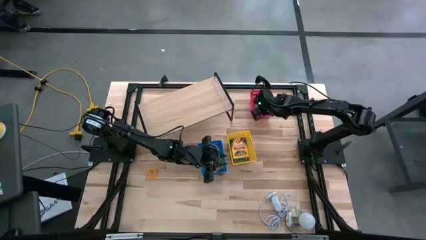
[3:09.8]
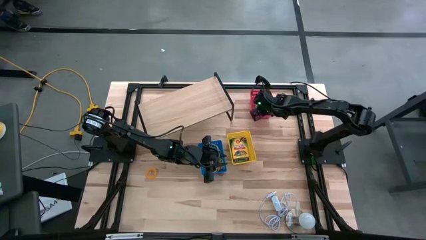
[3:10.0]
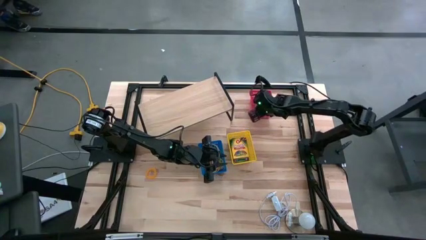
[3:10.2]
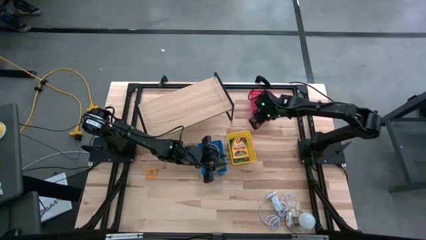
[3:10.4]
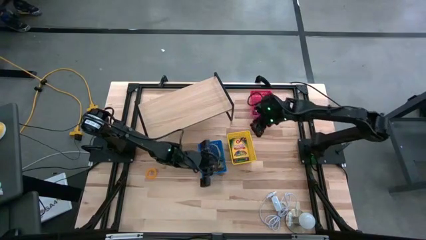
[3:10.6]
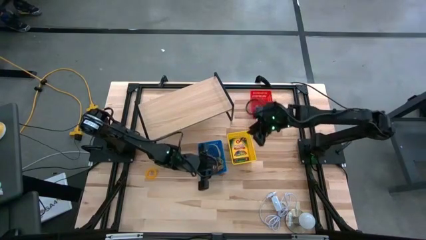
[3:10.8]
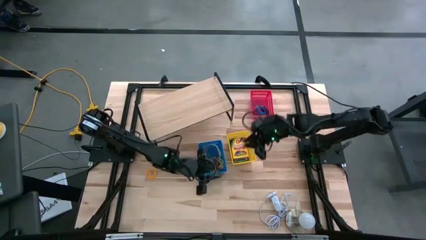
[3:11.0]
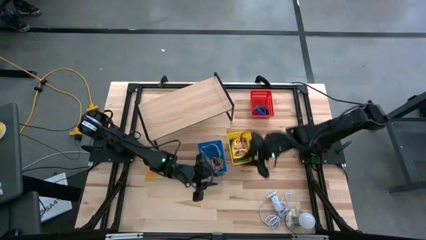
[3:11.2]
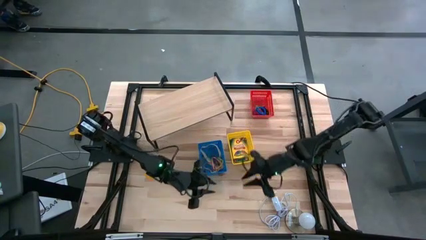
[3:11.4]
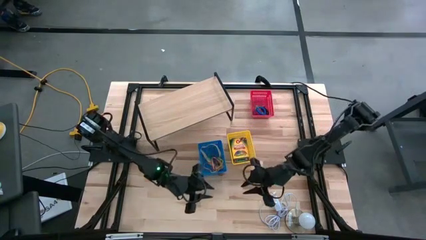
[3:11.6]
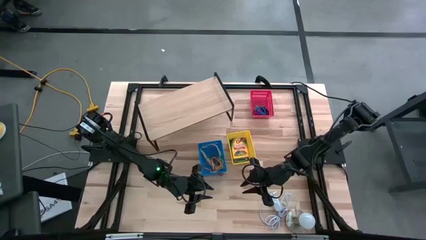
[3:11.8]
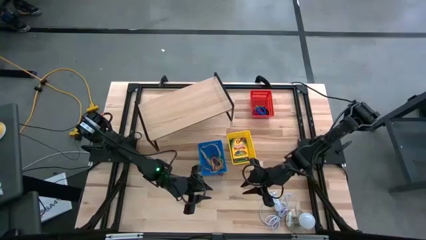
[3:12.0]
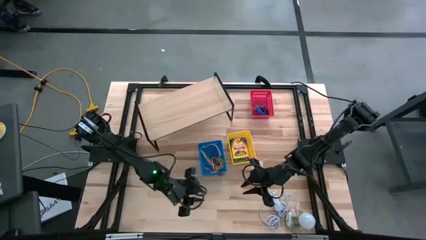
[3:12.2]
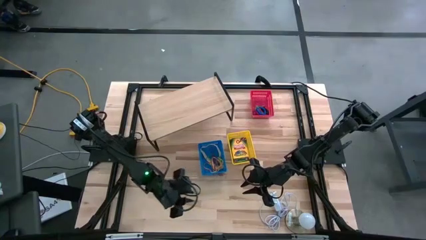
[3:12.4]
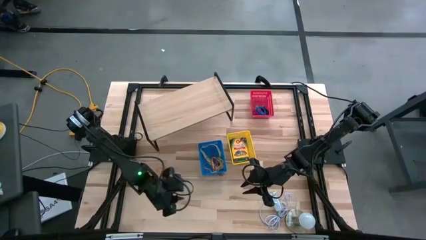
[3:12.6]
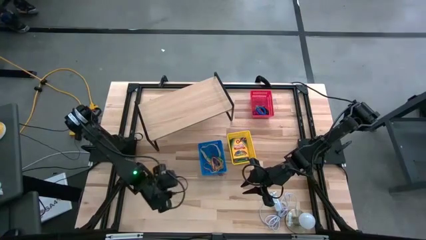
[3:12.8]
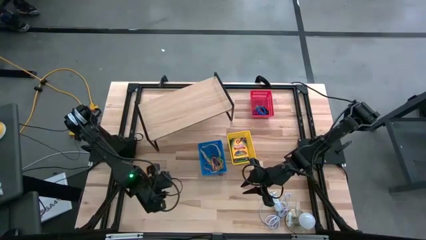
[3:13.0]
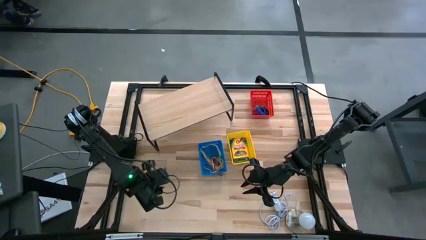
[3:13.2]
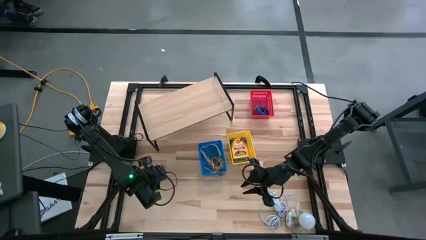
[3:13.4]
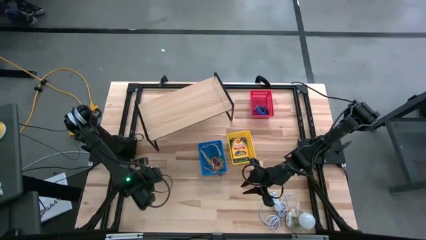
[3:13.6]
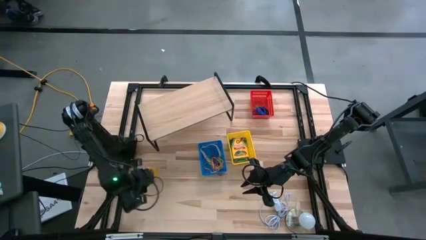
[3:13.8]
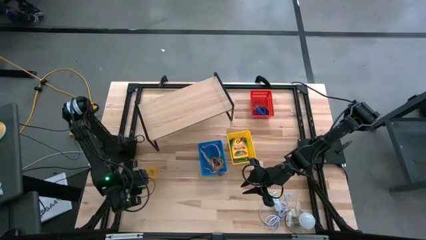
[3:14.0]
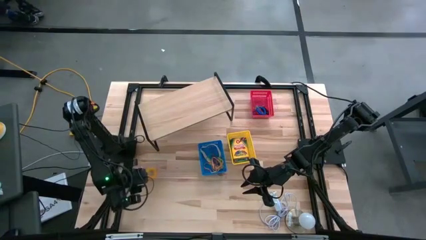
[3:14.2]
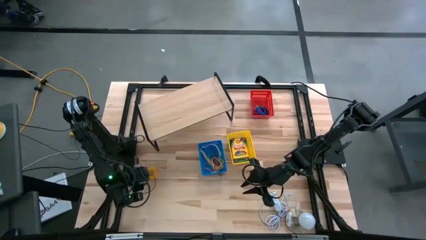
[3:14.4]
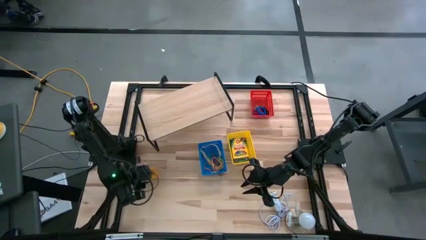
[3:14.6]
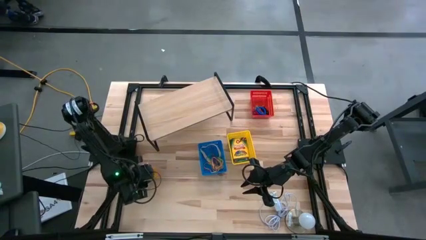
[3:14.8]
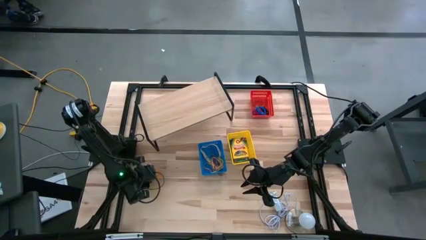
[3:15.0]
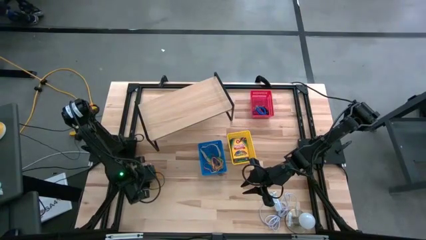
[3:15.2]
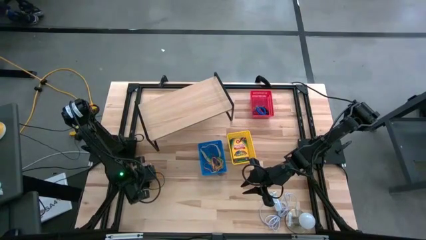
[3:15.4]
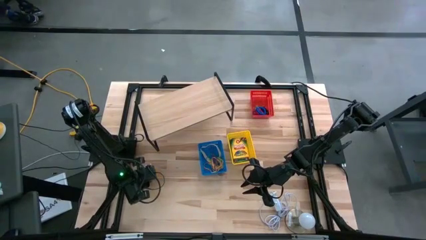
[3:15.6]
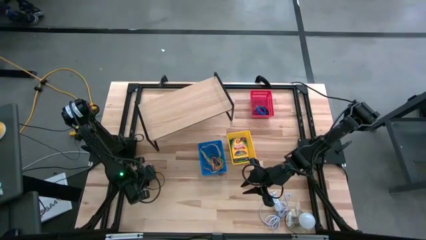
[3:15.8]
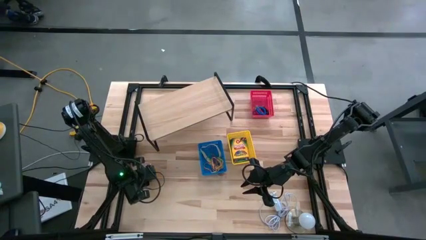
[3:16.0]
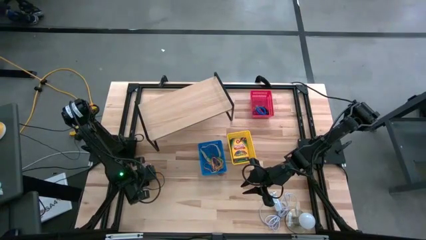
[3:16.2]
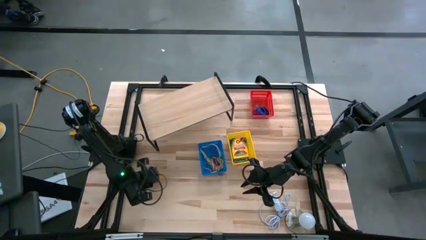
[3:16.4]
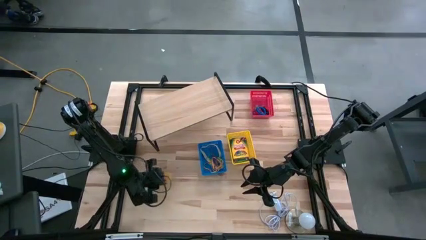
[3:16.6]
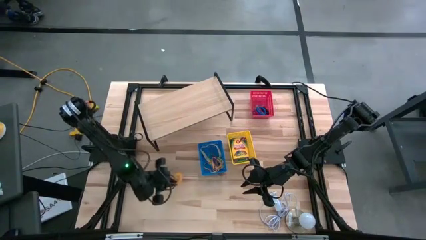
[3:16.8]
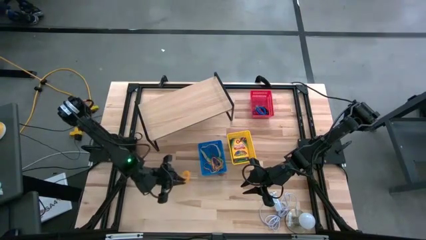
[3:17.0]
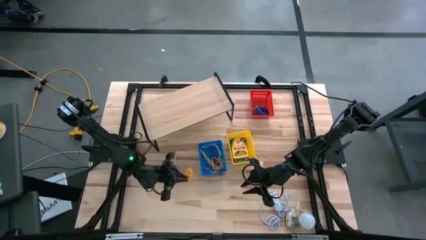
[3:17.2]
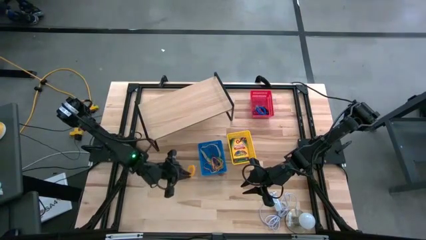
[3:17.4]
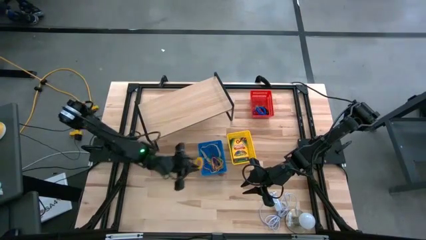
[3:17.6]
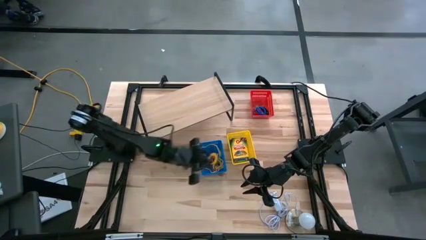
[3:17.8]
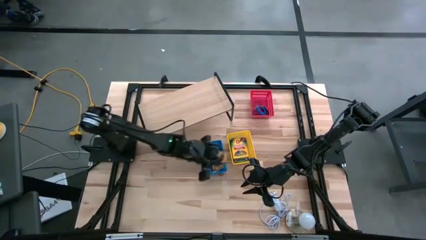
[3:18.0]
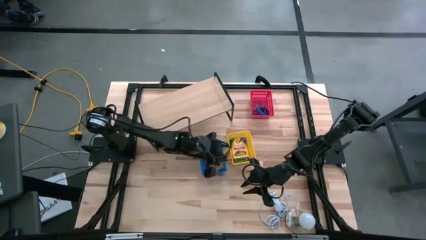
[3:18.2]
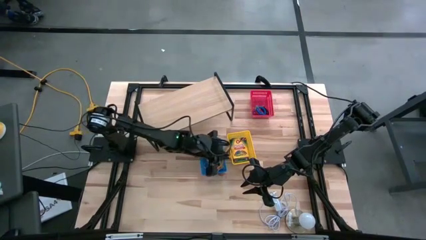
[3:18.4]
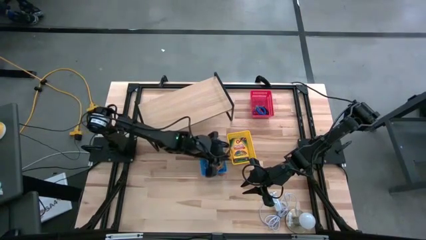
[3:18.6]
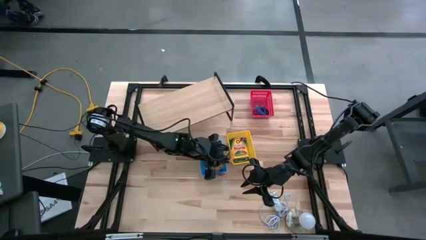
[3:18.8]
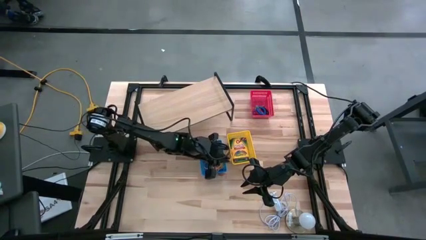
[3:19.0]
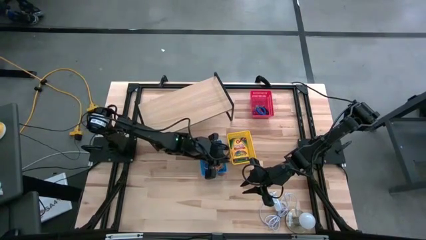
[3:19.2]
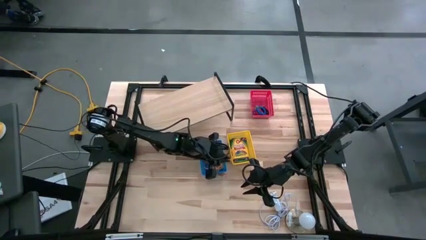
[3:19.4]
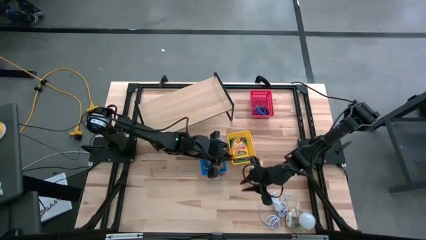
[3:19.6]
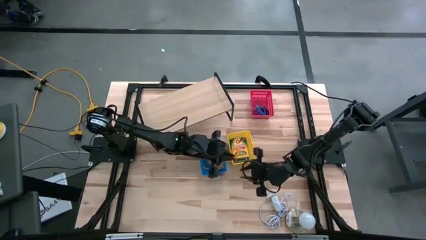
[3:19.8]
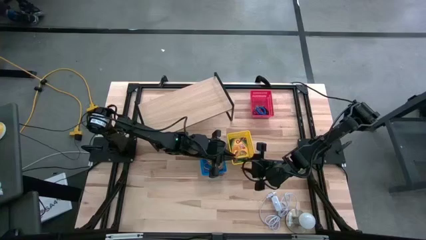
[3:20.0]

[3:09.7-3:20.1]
Task: Pick & Place Office Desk Supplies
Put the yellow spring keychain into the red bin
